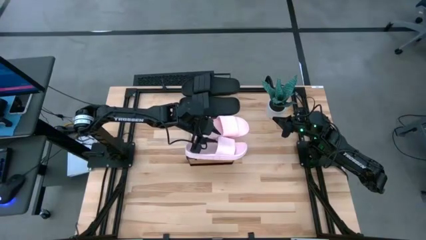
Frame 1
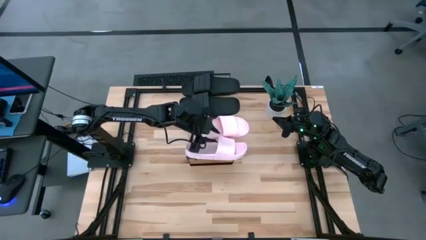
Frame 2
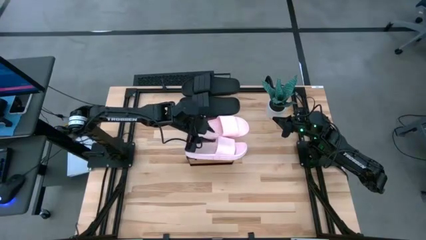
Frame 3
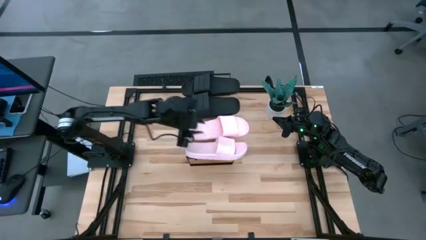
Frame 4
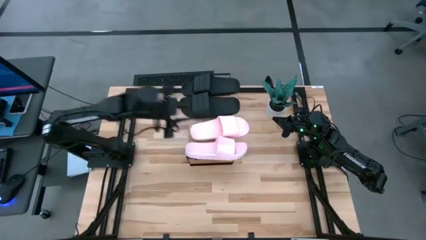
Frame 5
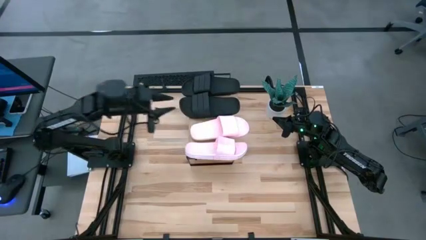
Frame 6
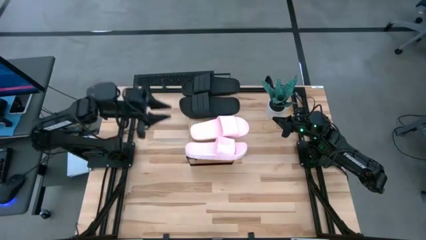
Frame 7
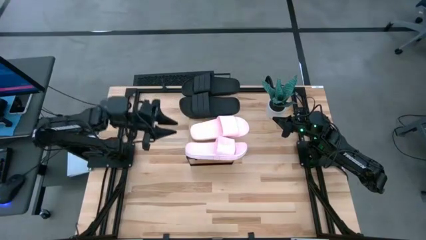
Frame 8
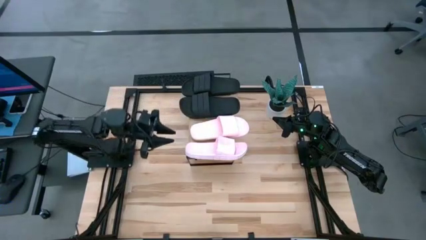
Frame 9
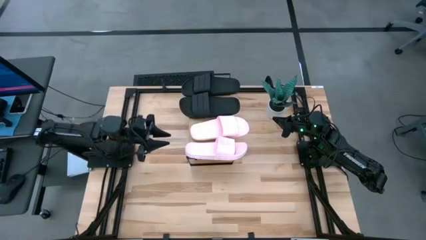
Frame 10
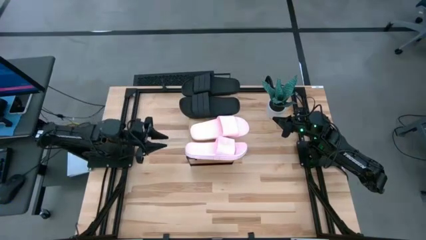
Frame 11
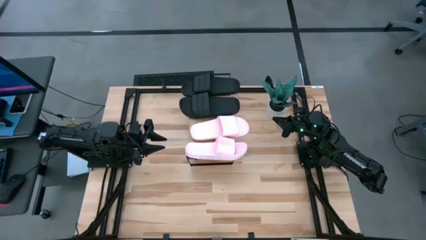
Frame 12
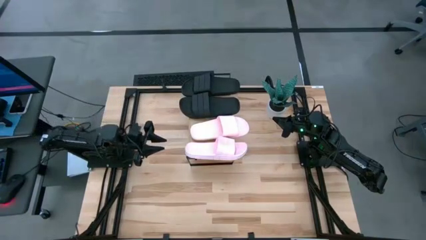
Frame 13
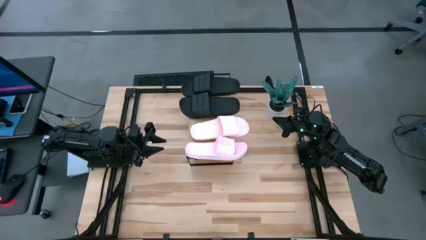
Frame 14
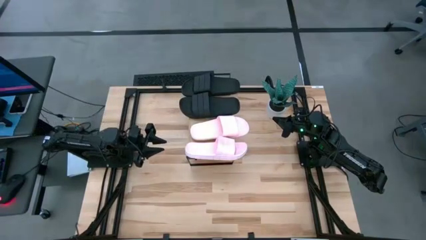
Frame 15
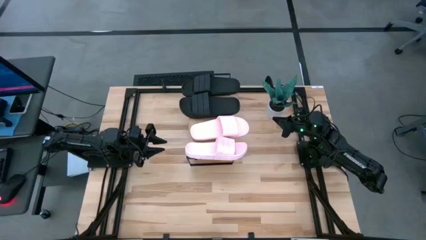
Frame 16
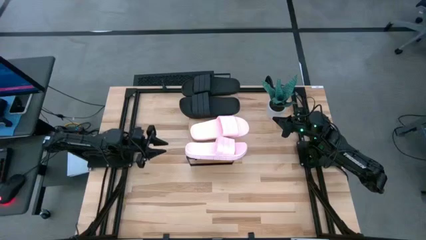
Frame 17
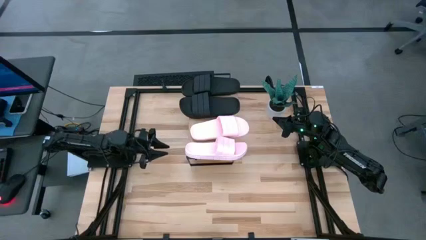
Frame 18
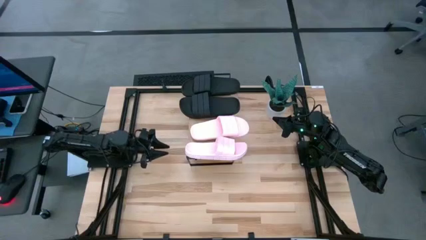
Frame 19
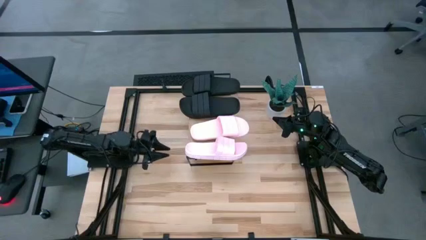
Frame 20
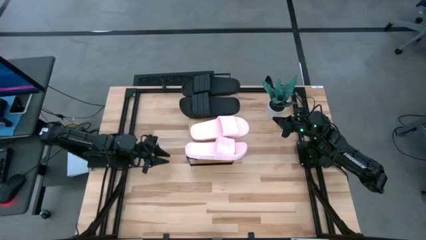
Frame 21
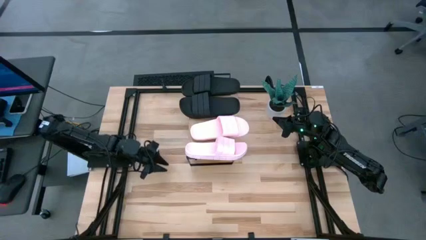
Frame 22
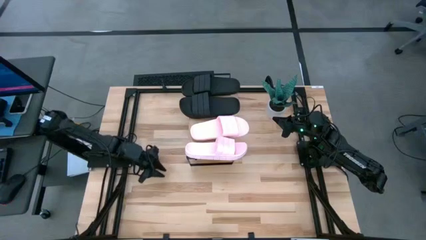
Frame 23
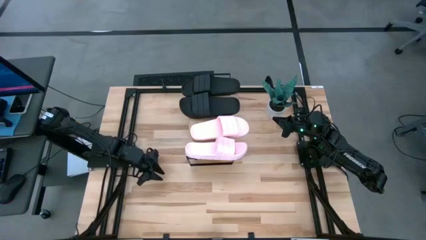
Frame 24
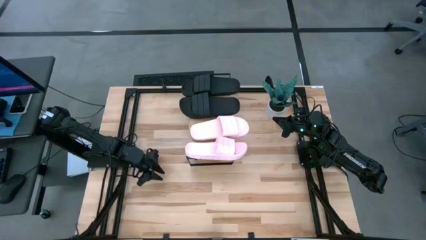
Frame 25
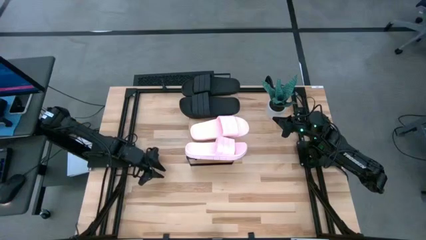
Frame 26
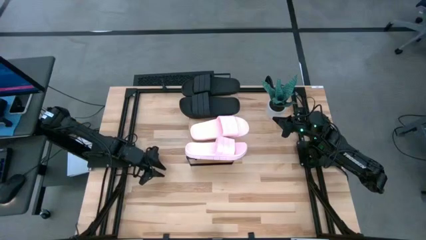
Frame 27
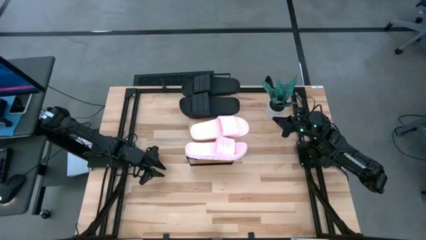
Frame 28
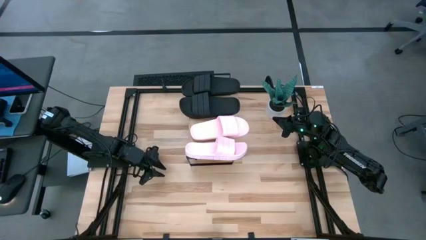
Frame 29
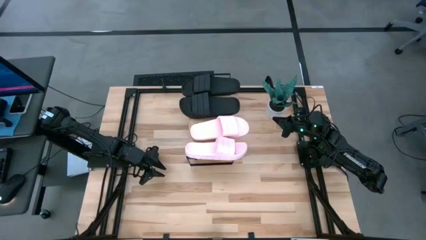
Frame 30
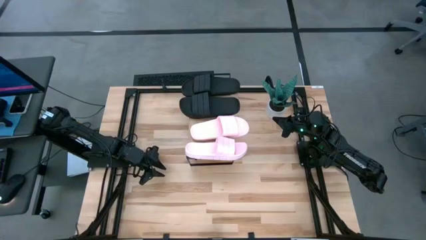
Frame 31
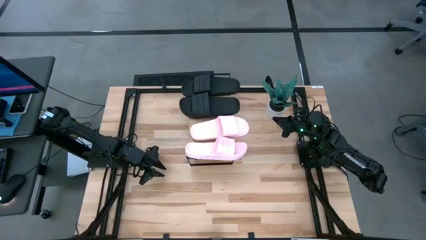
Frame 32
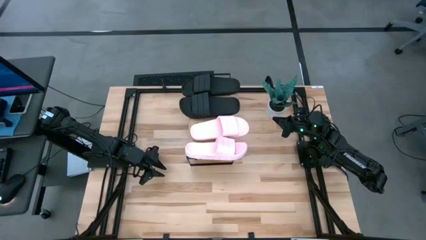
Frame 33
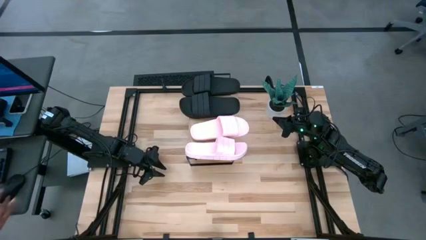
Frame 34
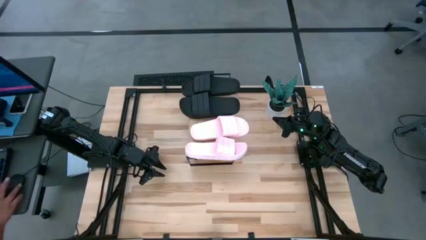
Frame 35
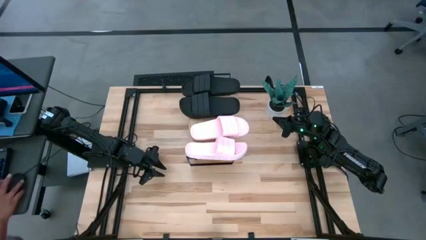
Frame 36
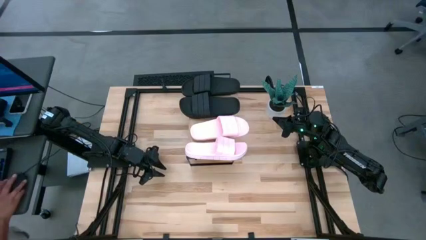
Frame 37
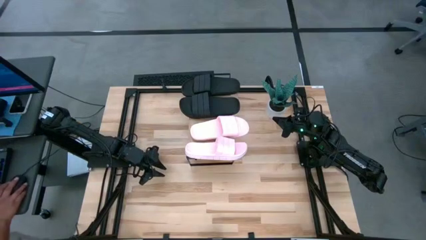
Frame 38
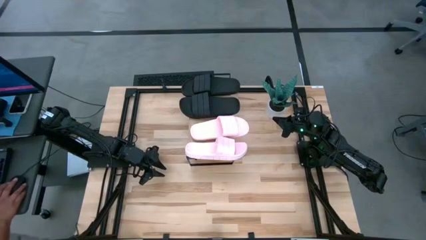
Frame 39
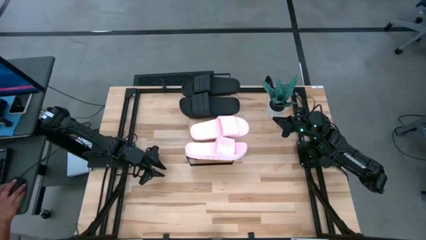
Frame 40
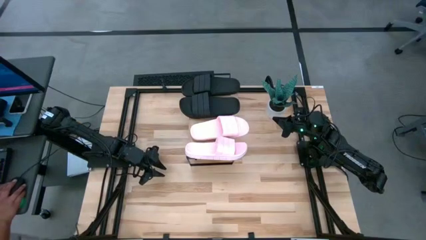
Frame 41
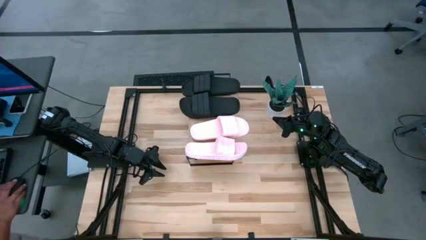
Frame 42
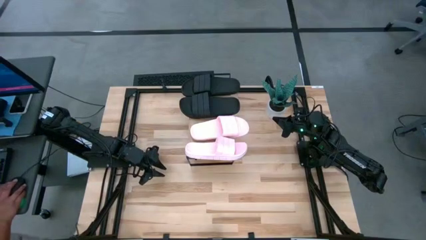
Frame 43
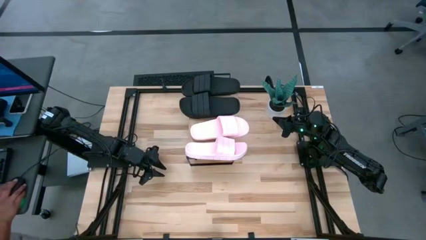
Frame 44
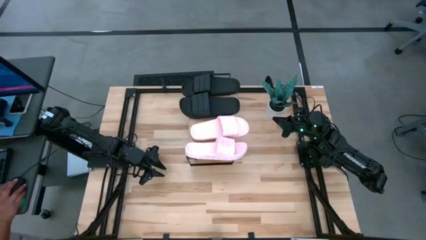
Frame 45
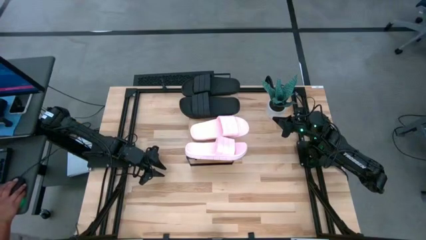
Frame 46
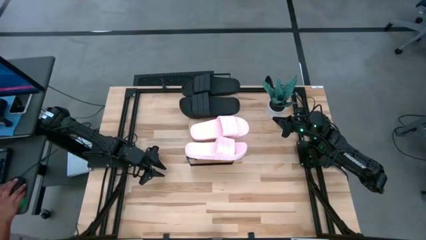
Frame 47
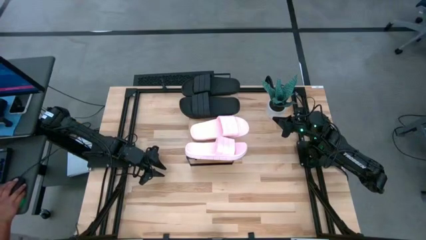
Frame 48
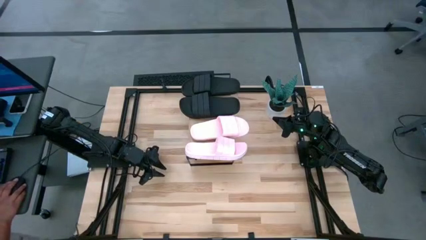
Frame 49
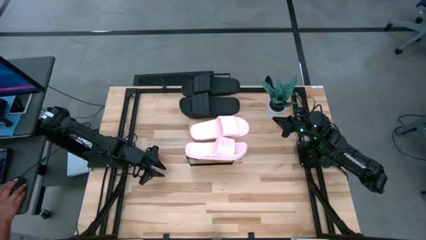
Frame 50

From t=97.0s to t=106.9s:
Task: Pick and place slides into the shelf
Return to Home Position
